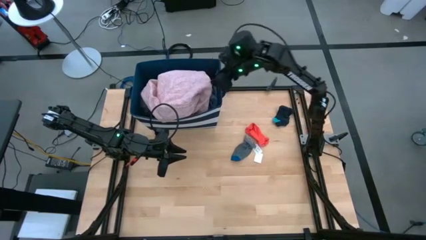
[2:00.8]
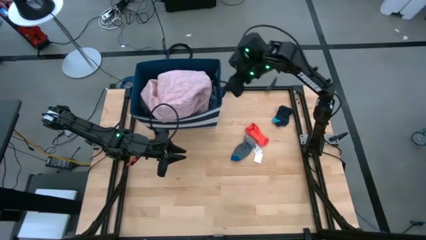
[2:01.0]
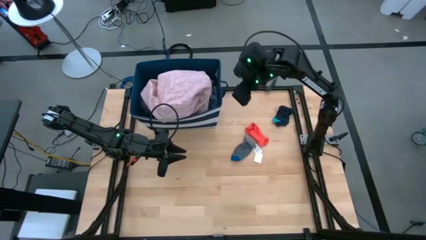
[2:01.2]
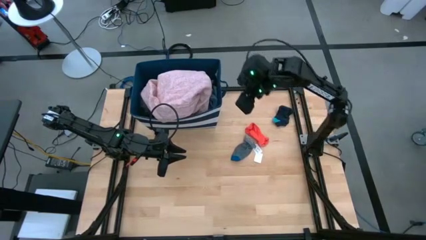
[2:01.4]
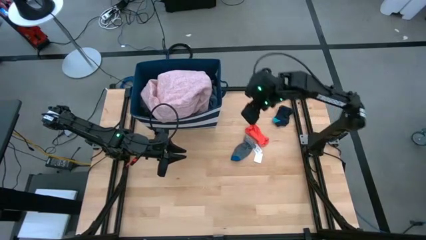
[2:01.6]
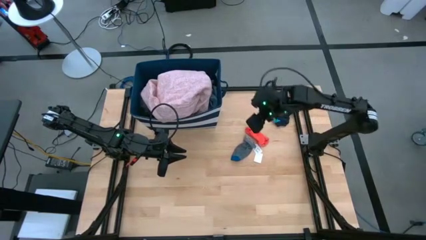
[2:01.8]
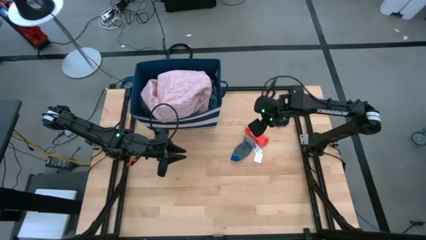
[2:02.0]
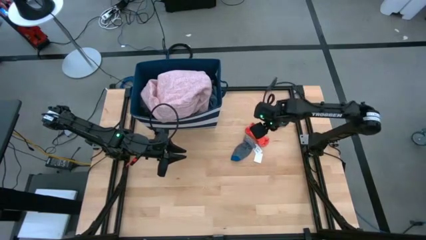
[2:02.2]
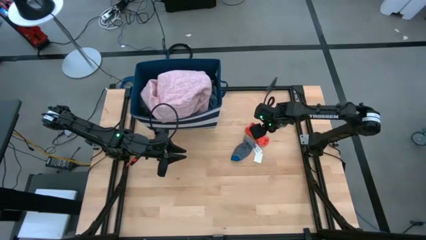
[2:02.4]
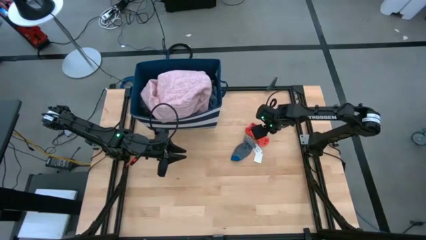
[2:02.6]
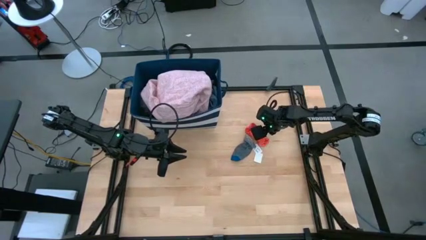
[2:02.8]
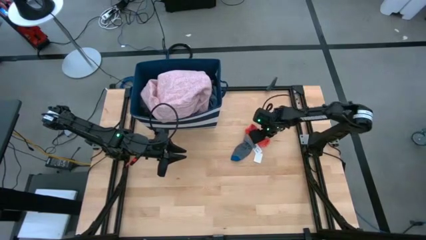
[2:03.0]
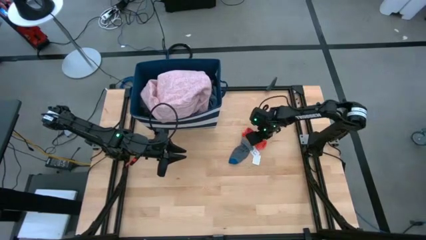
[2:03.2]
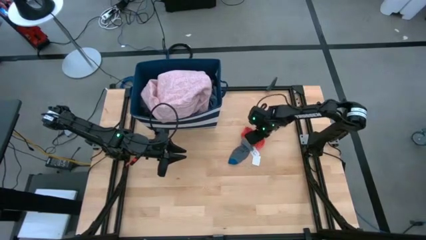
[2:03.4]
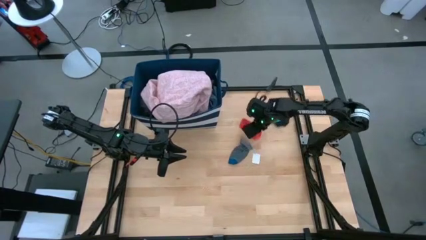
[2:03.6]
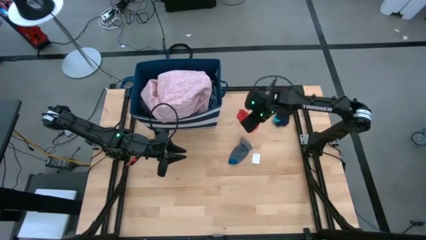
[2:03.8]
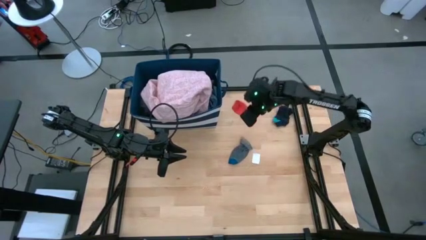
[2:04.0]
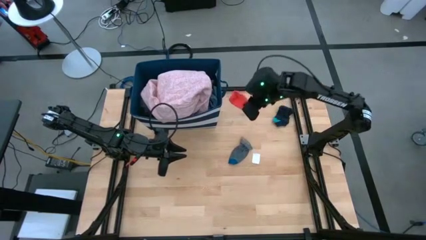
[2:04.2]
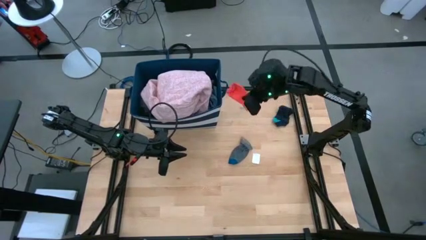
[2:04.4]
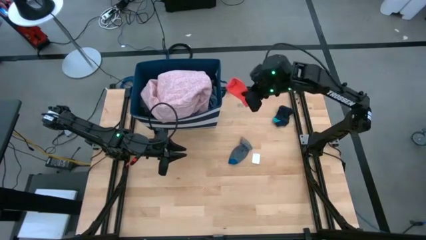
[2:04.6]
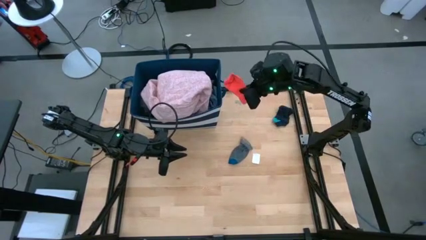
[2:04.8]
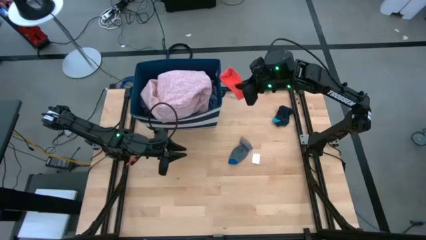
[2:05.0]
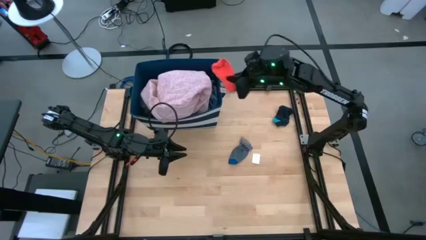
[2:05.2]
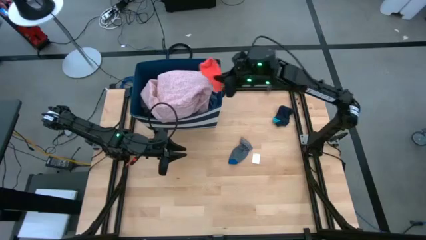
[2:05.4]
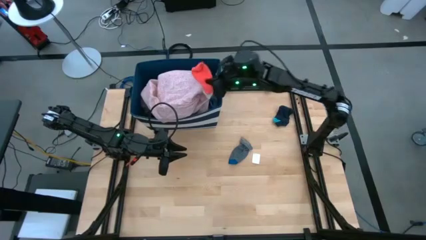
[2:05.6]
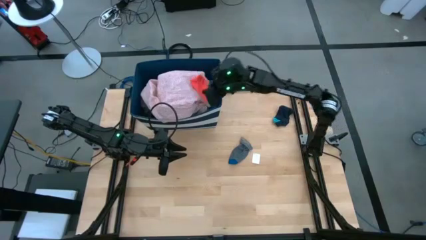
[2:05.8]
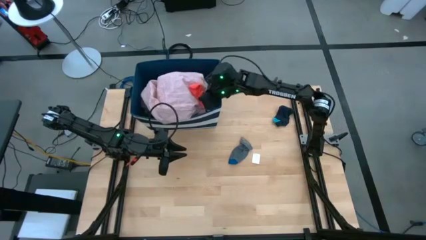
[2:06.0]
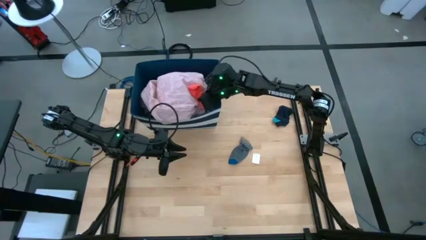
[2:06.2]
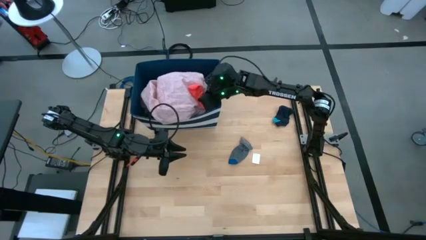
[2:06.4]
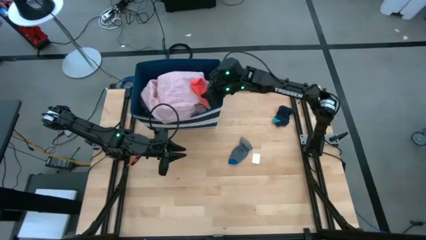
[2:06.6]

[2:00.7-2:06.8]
Task: Sort clothes
Put the orange sock into the blue laundry bin

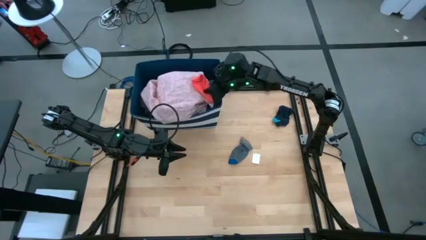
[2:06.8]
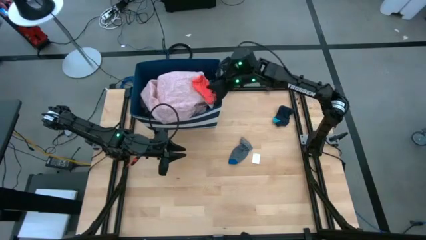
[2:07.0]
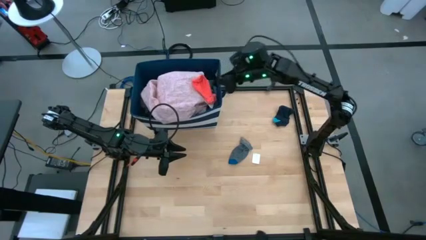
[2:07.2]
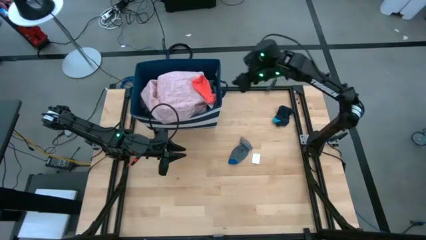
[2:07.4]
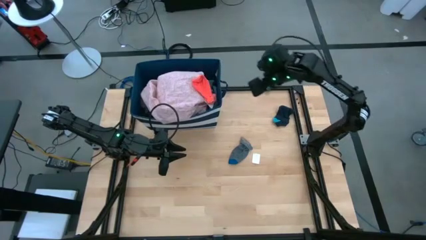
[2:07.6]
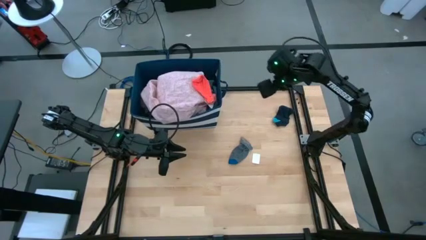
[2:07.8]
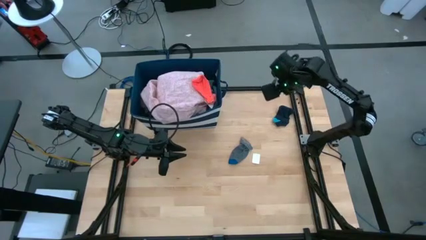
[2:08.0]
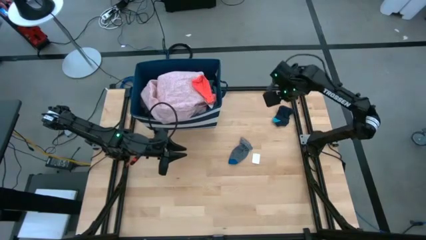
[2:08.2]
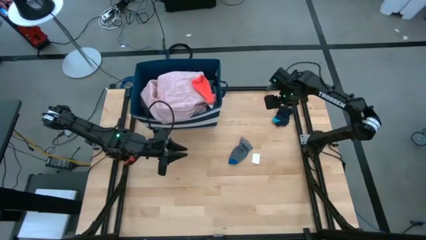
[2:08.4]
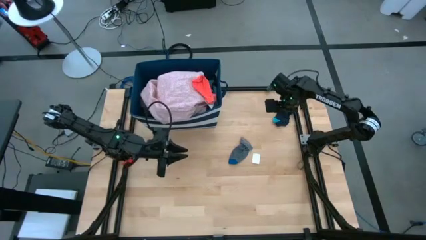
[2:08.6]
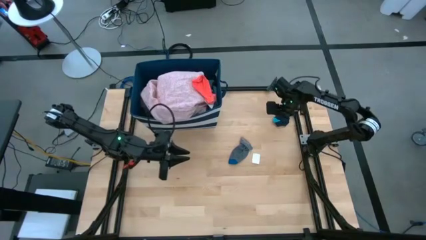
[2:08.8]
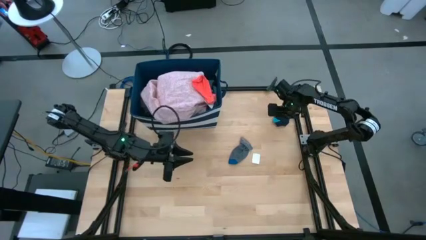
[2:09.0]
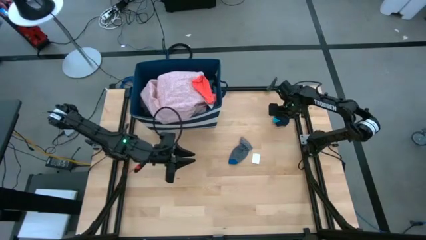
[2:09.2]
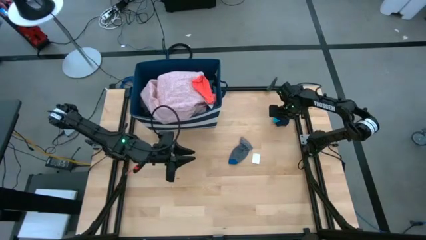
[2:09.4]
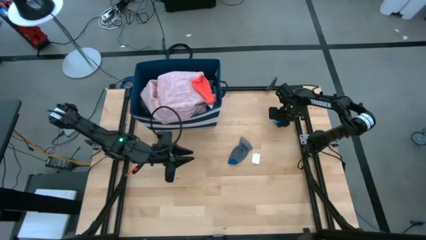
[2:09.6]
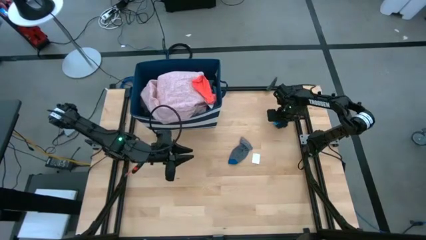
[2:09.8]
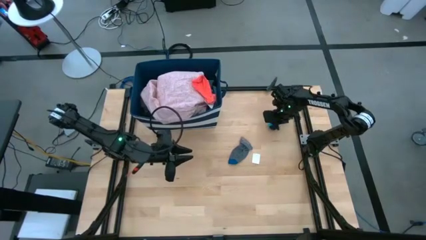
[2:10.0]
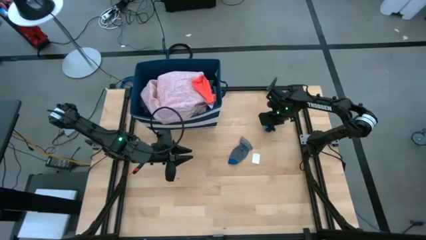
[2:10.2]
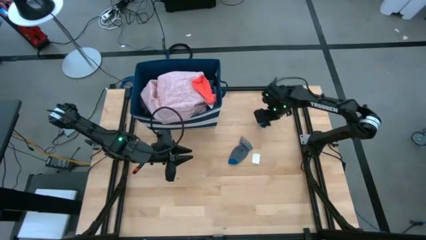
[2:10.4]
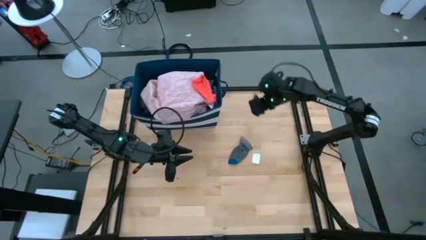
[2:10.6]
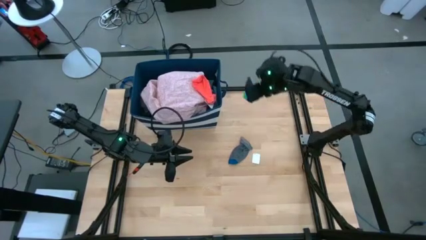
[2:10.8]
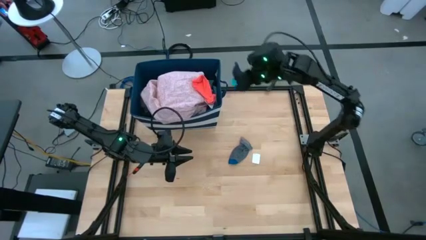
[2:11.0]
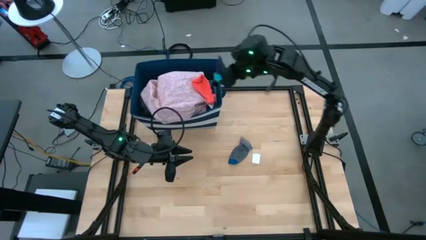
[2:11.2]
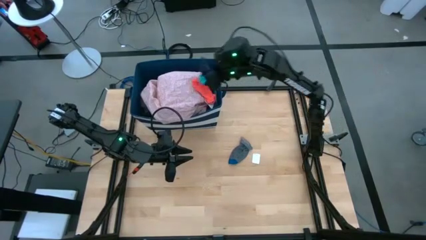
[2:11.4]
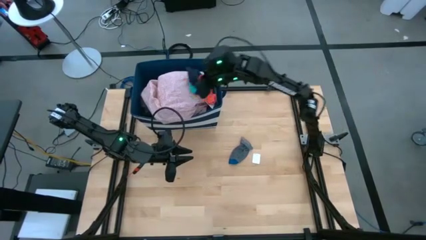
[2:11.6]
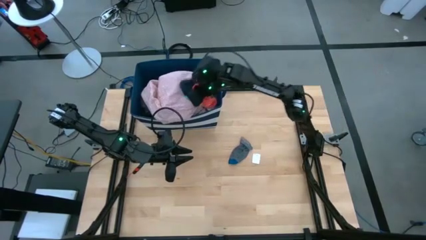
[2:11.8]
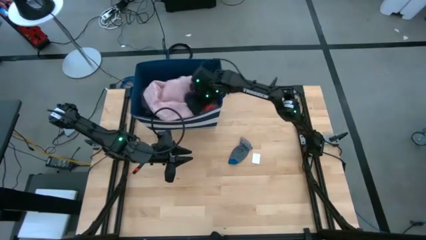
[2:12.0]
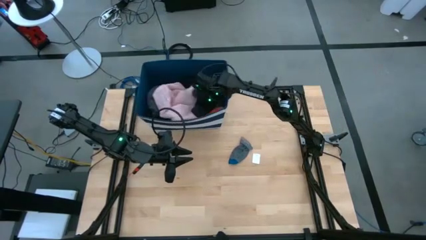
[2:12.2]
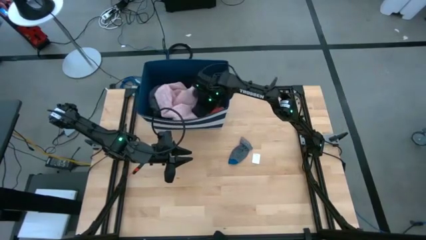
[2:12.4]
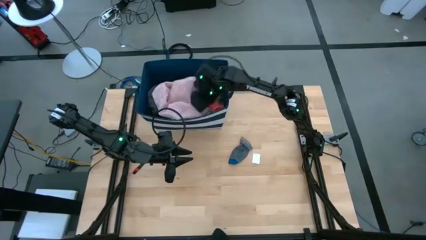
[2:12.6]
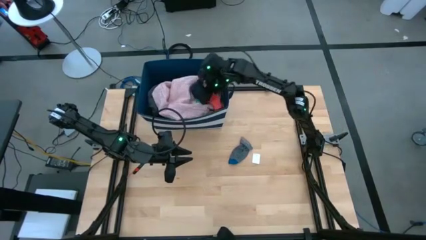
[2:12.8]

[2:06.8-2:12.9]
Put the blue sock into the blue laundry bin

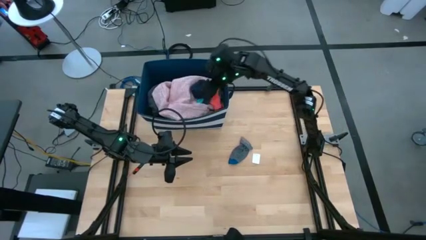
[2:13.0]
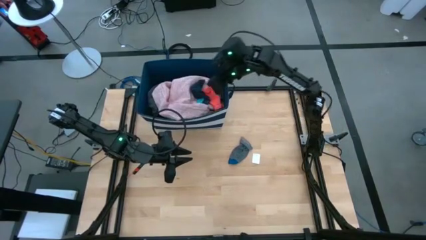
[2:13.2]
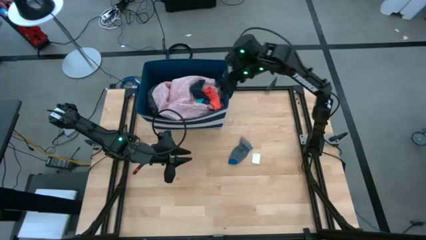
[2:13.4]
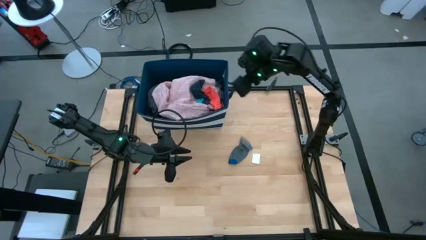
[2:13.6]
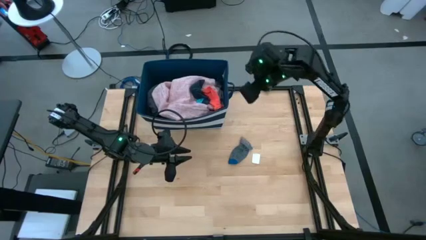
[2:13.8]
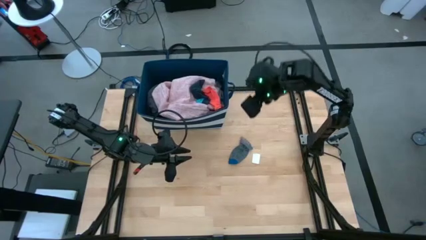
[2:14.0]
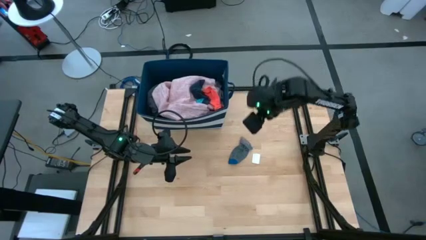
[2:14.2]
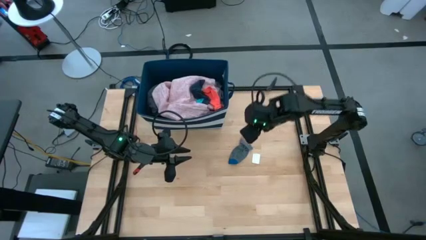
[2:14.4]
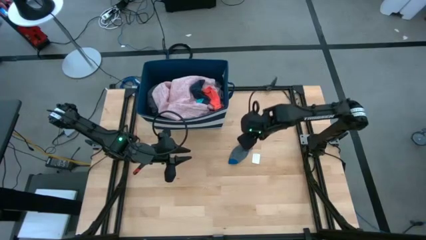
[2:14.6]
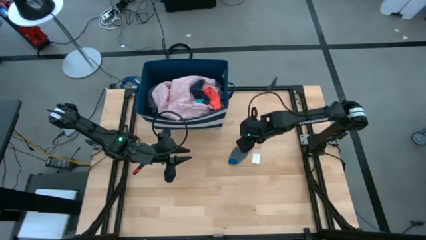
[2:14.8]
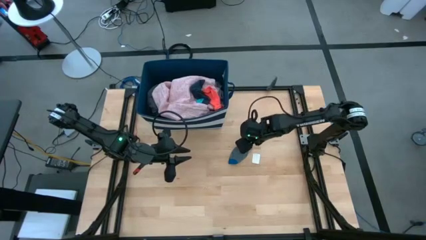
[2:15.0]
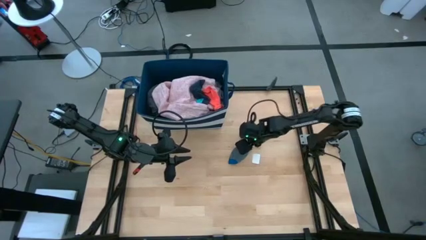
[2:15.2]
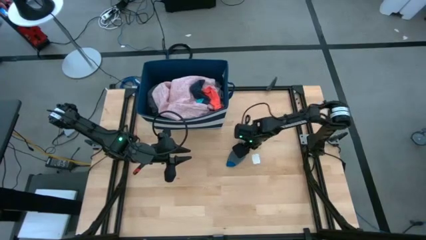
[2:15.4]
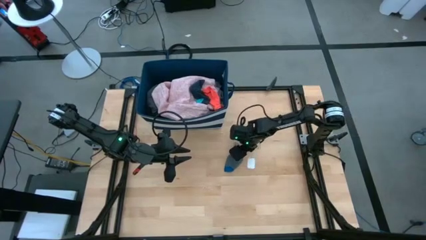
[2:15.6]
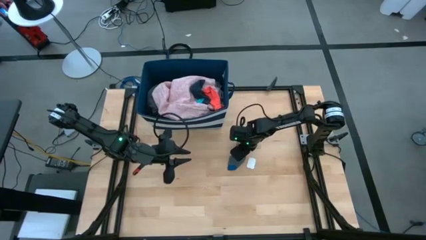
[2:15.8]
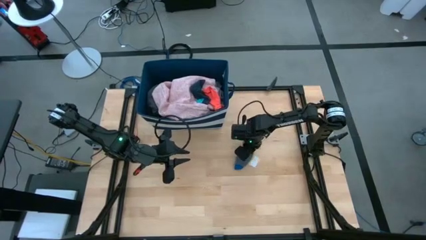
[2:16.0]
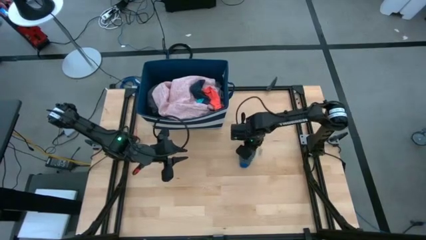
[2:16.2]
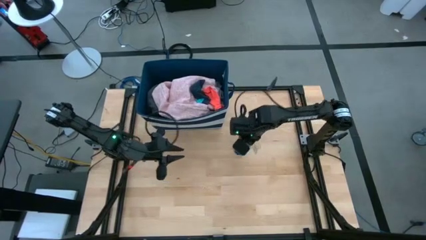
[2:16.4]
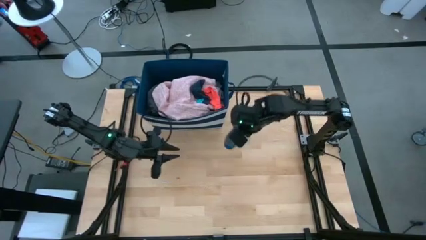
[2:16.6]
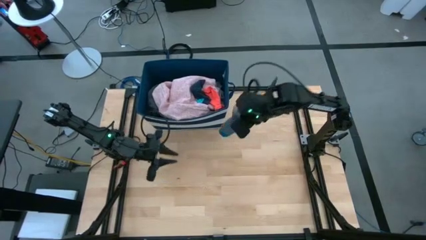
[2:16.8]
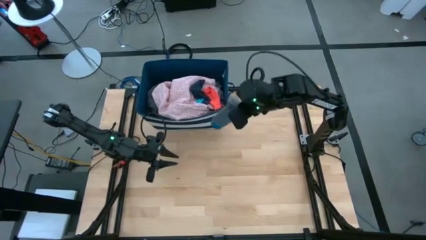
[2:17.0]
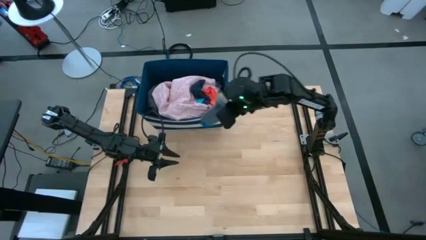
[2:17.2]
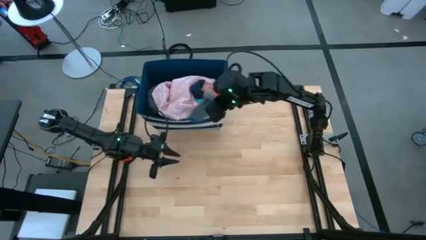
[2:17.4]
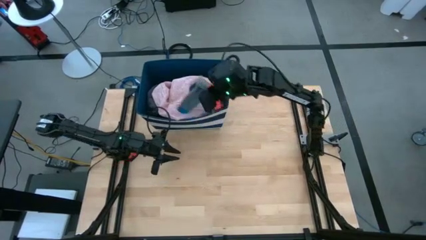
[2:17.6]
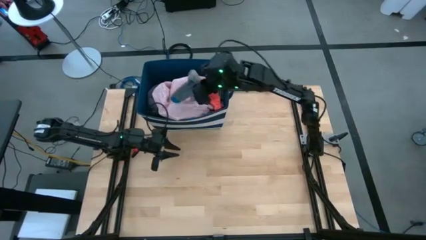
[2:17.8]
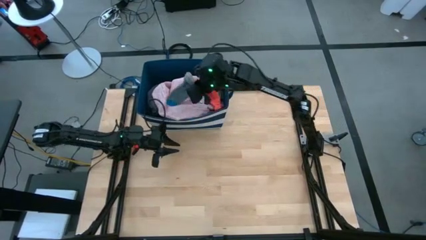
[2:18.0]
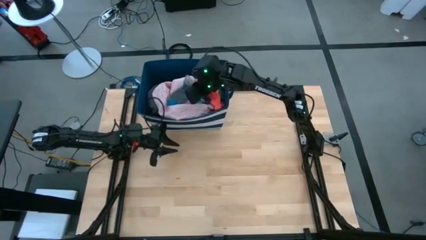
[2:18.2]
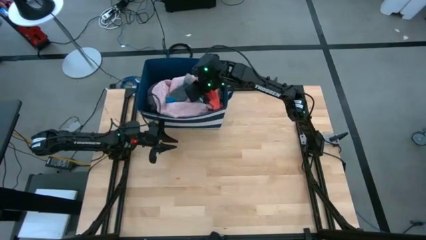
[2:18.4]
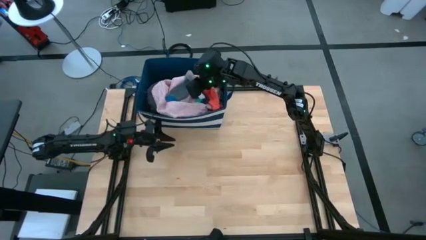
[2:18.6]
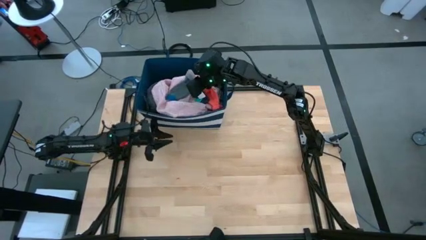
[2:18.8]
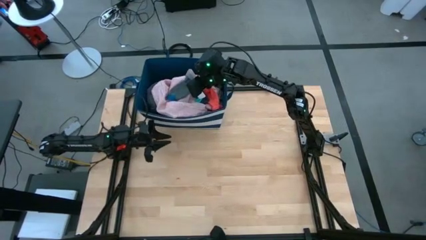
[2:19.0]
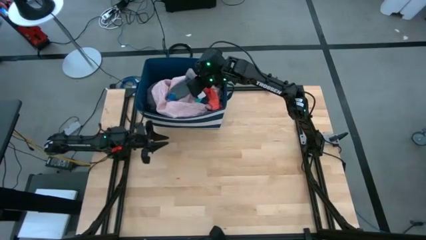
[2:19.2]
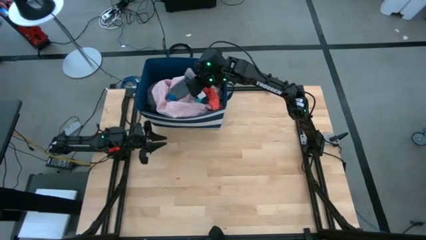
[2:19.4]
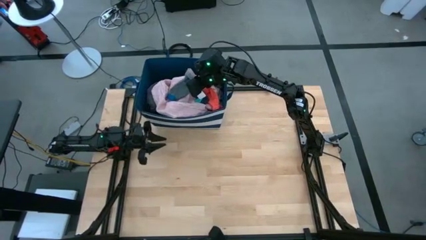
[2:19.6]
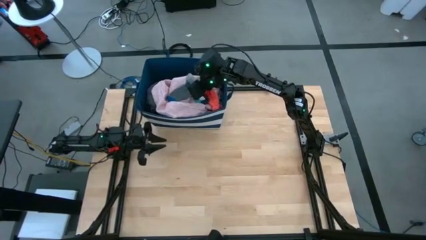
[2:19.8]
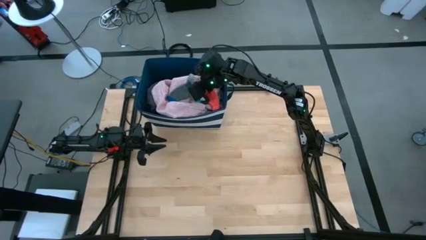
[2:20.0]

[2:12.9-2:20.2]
Put the gray sock into the blue laundry bin
